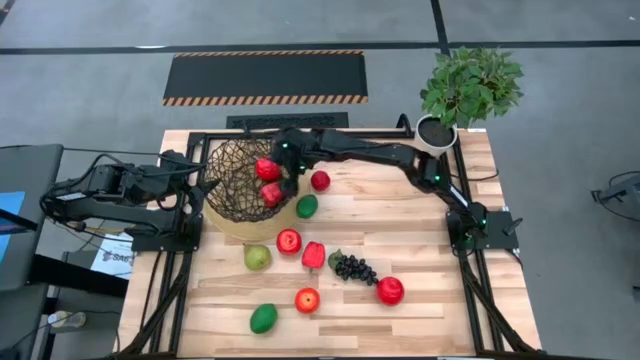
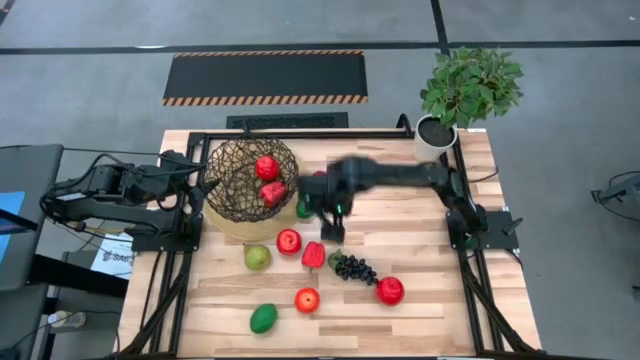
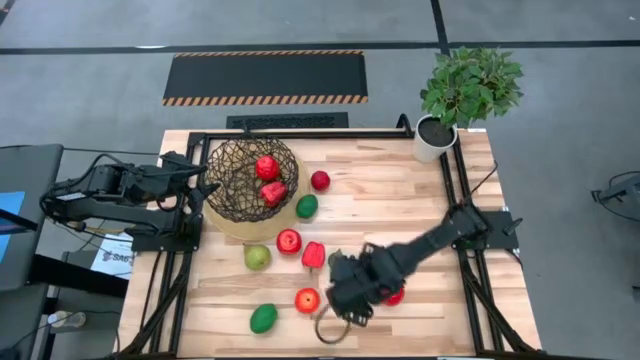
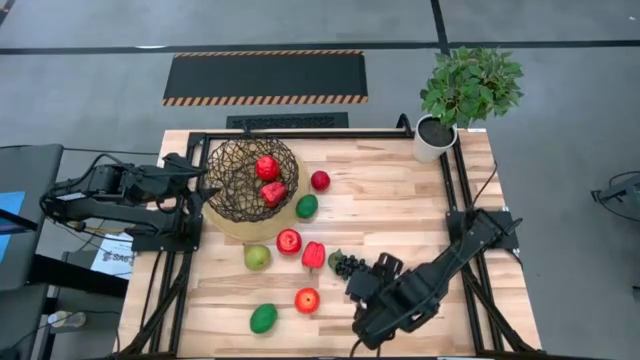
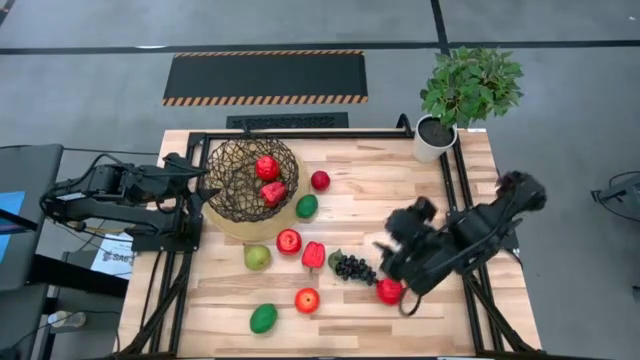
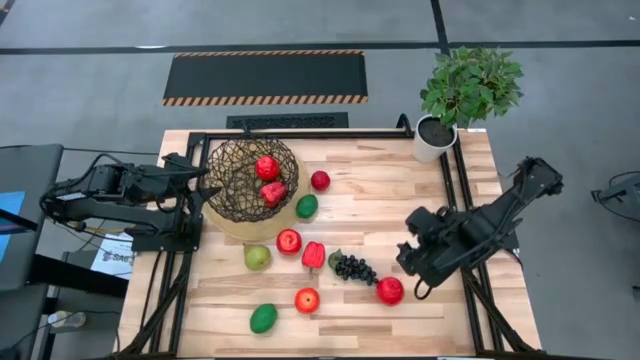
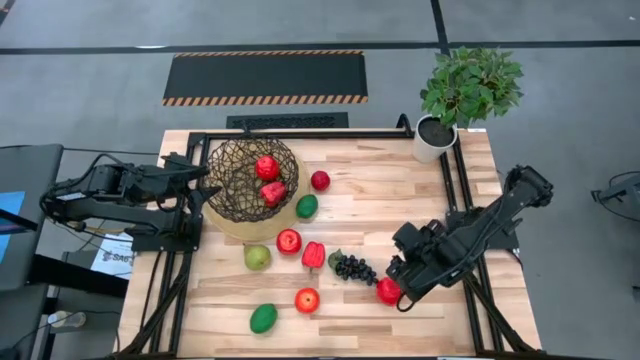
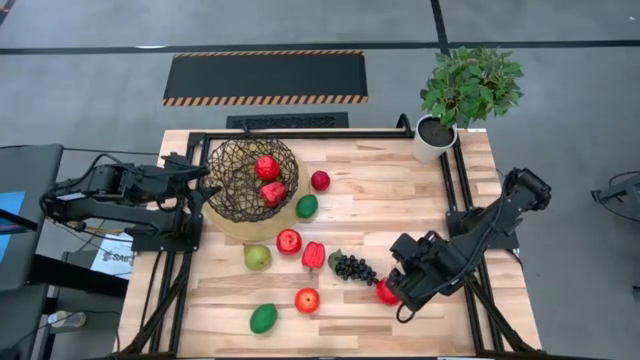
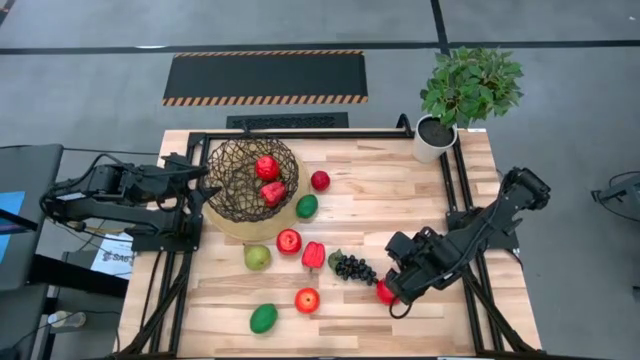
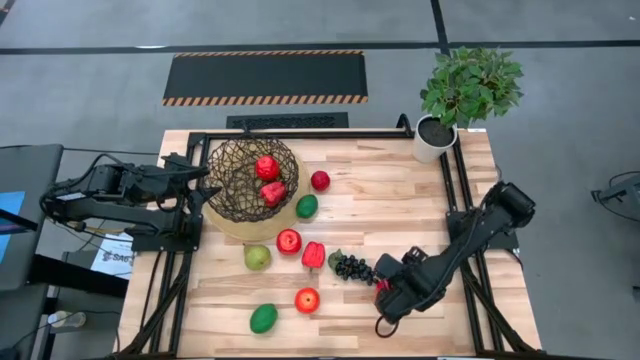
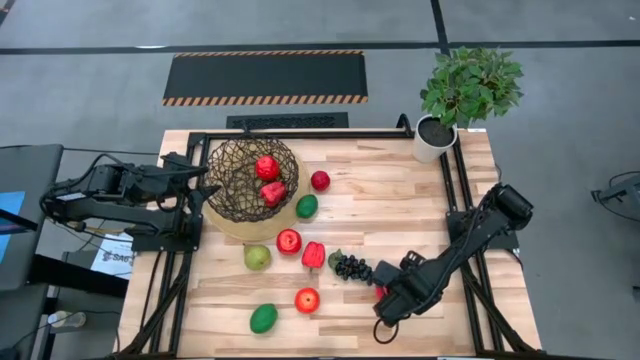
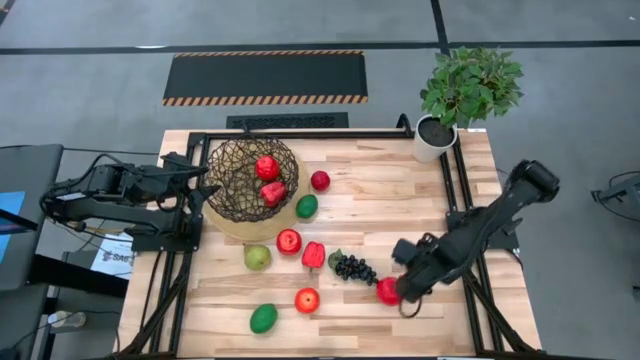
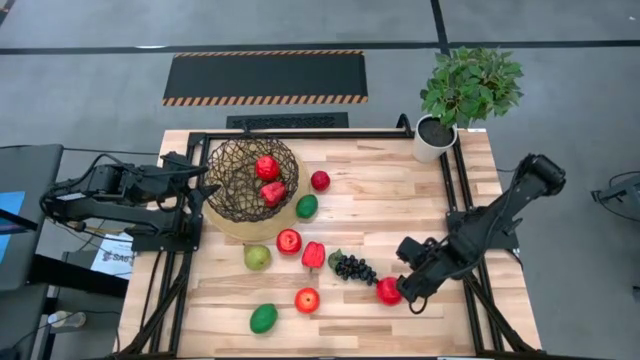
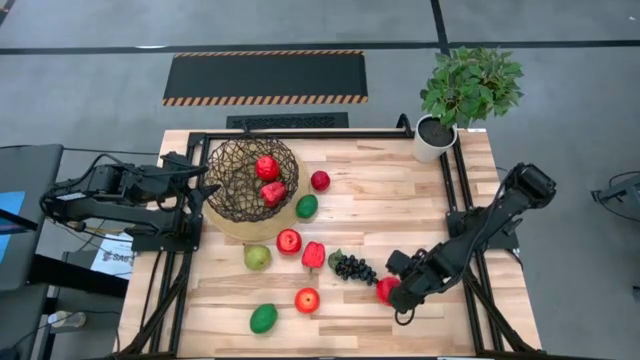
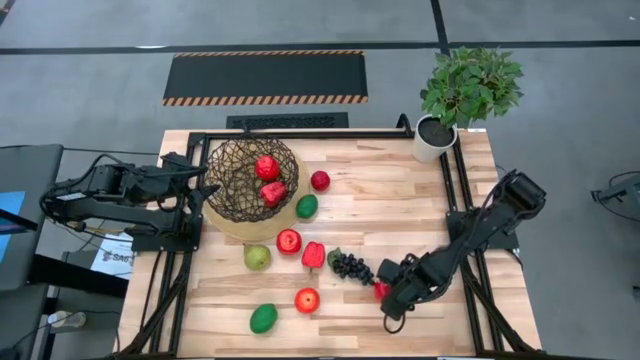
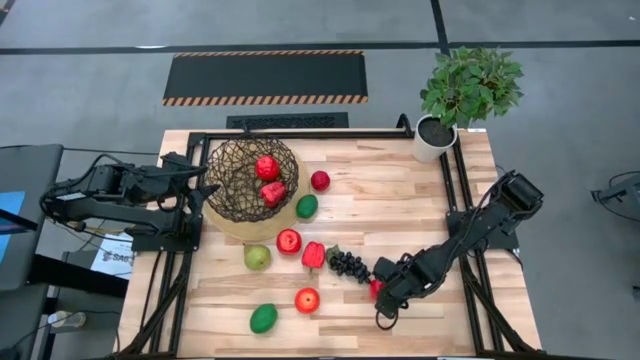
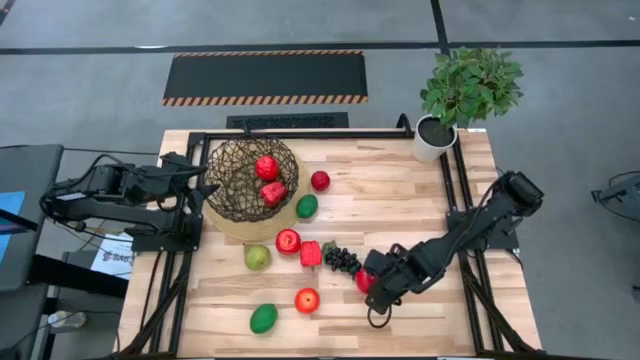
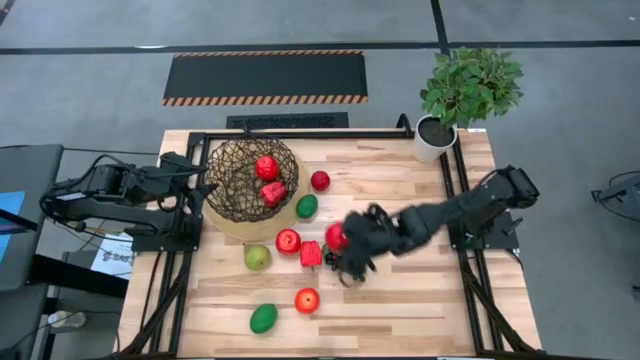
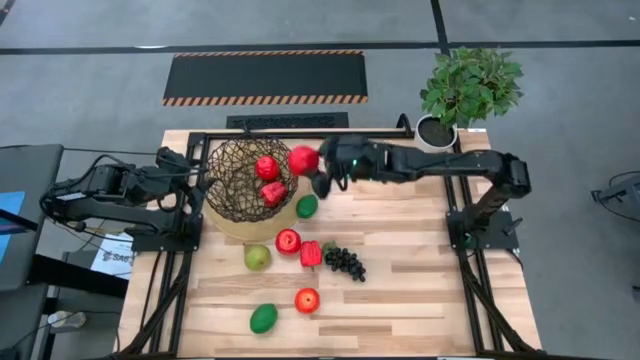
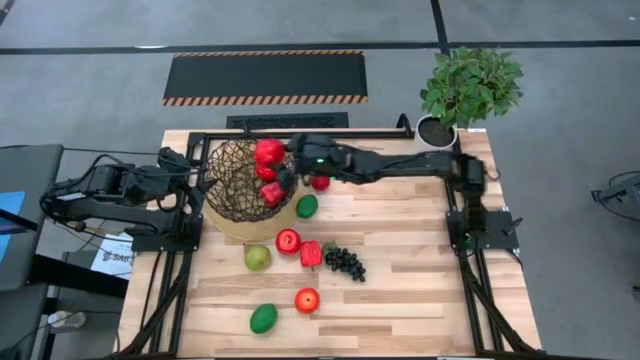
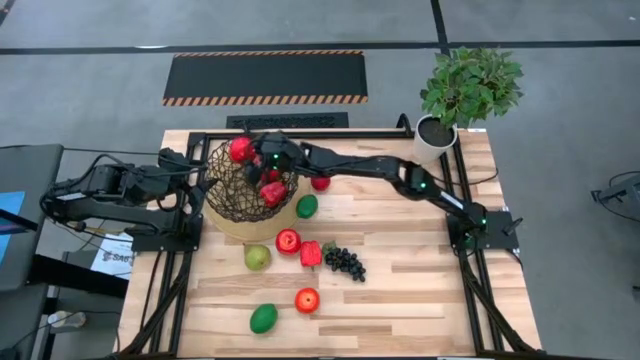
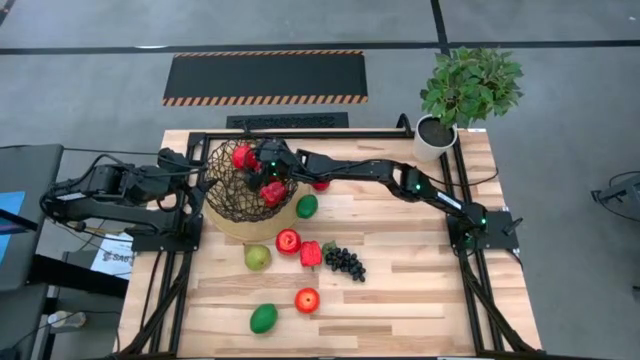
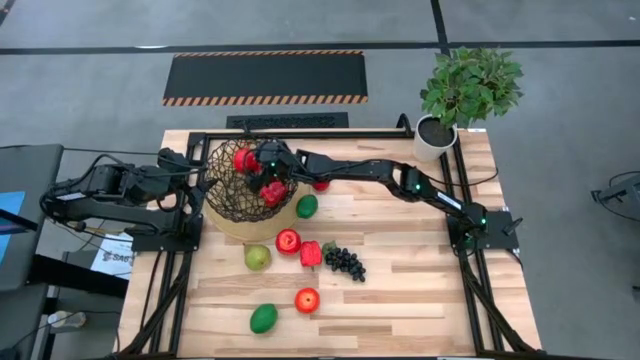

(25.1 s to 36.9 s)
Task: Build produce basket
Put the red apple into the black wire basket

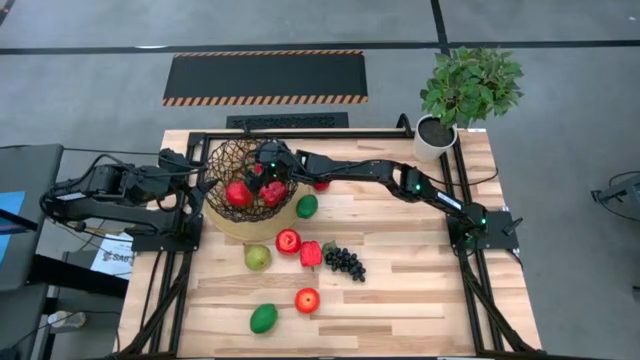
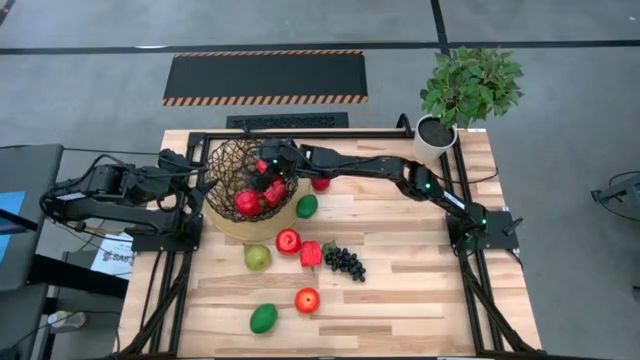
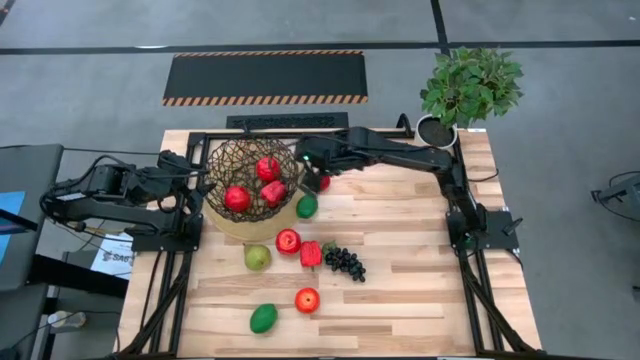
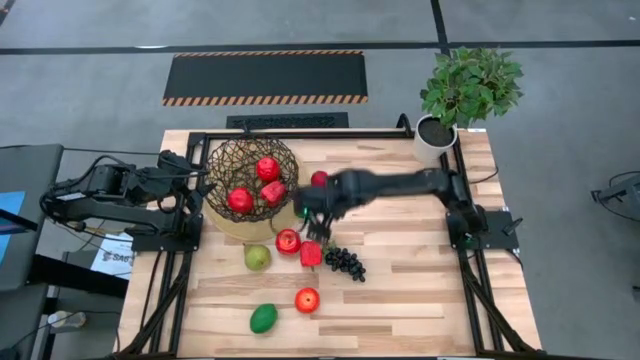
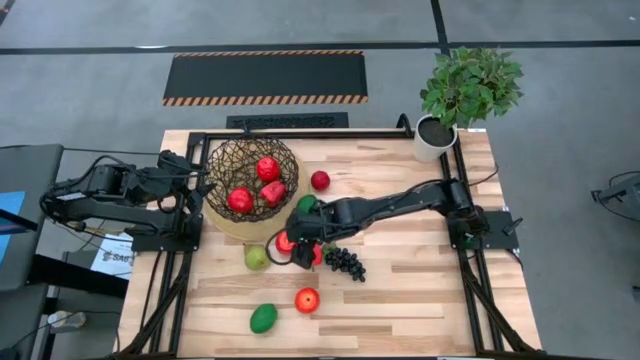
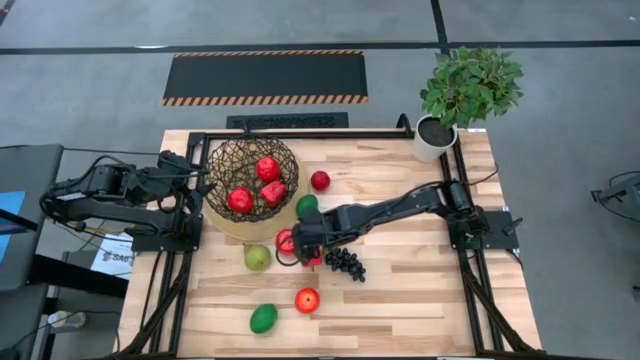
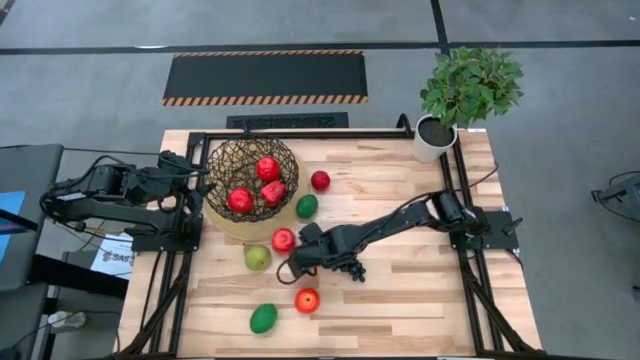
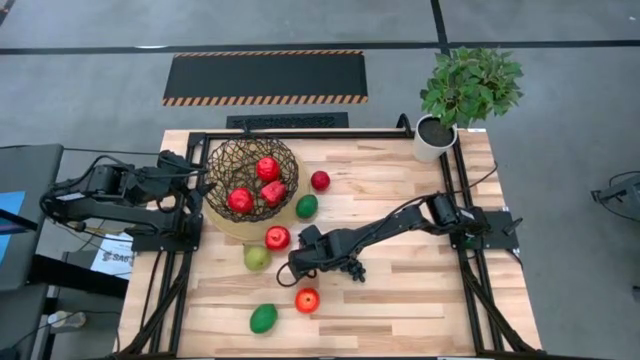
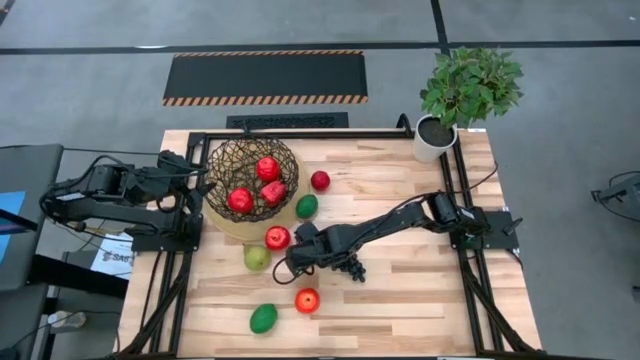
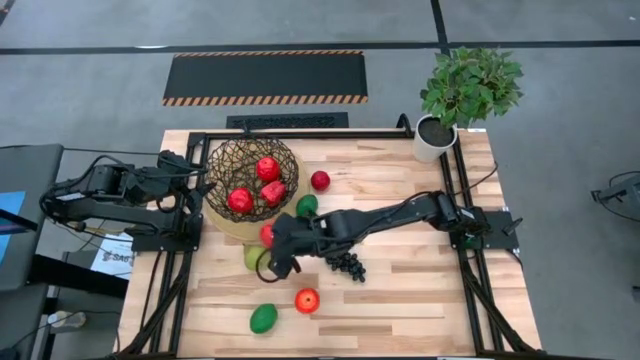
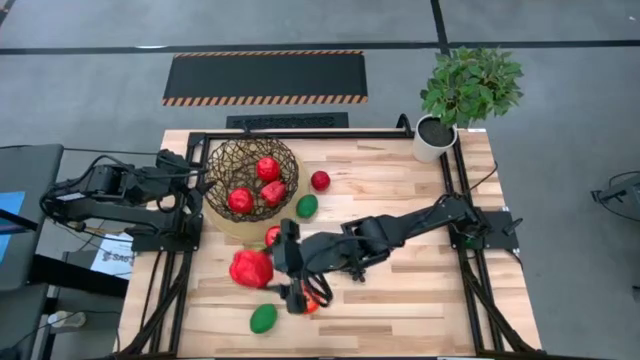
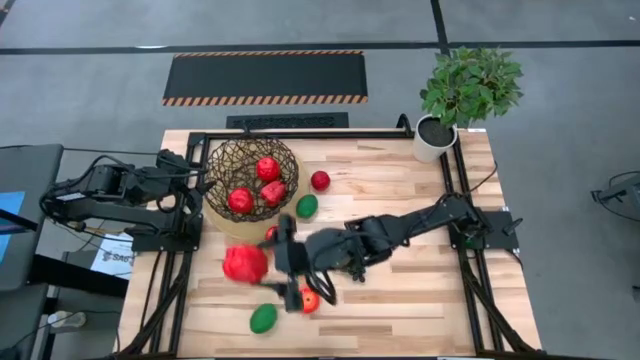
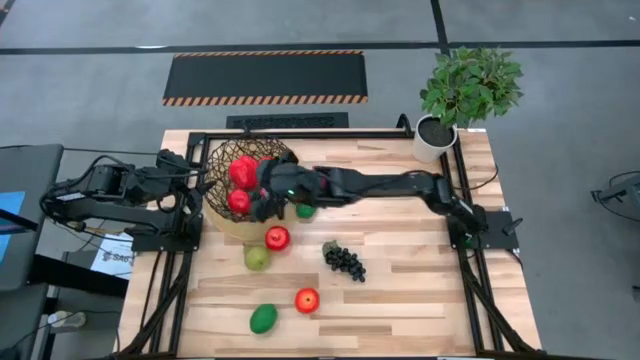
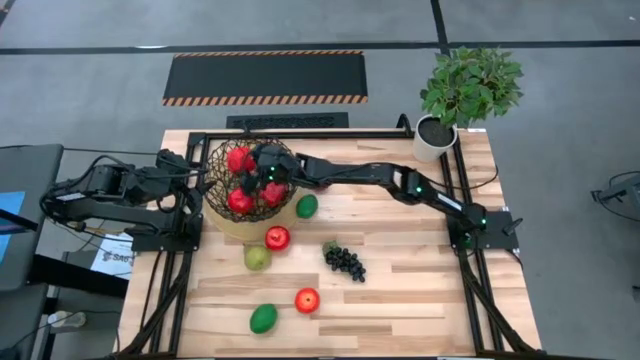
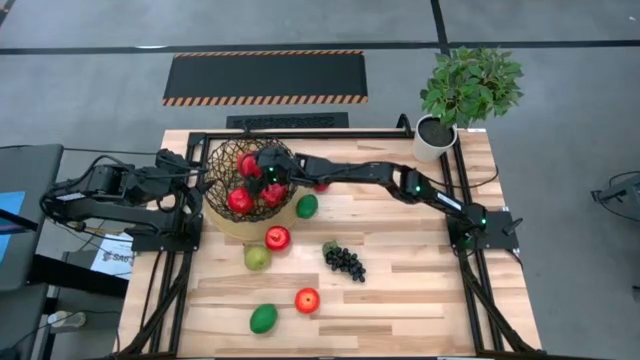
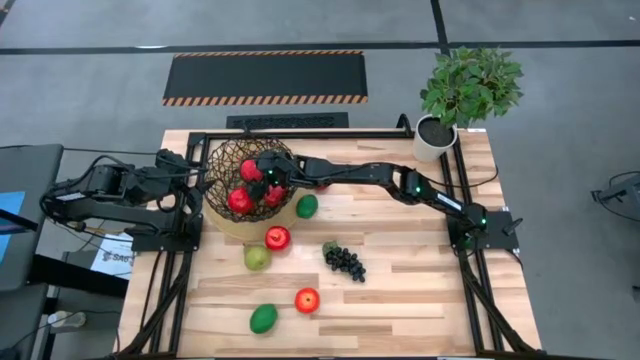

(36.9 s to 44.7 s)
Put the red bell pepper into the black wire basket

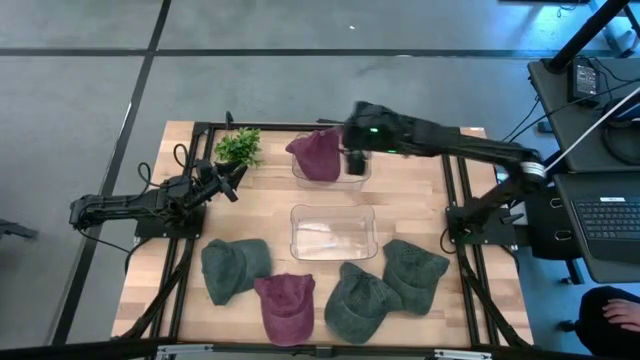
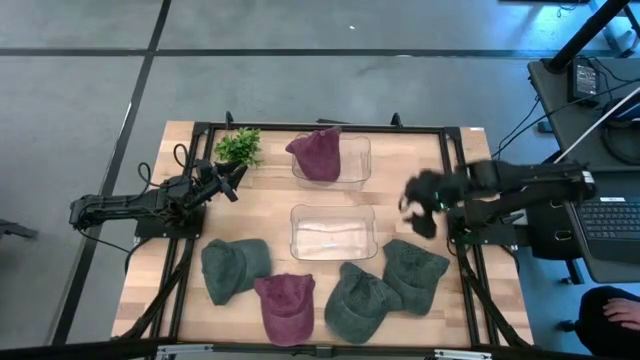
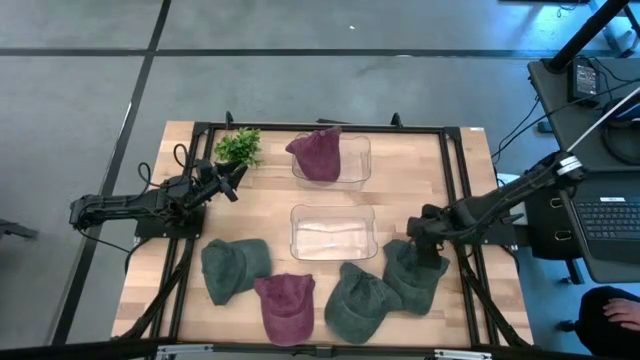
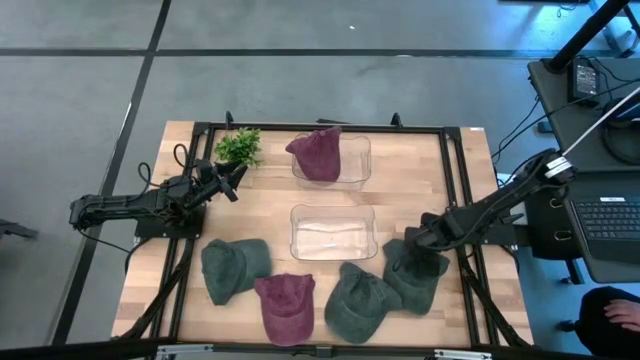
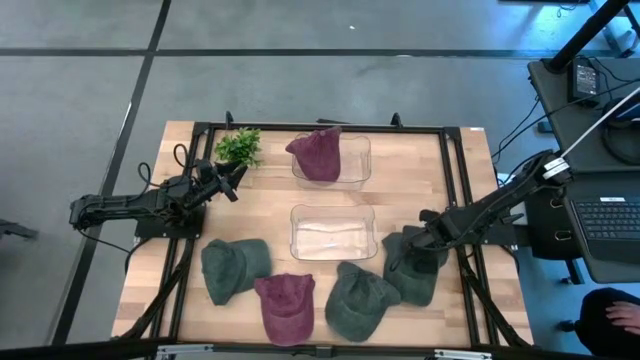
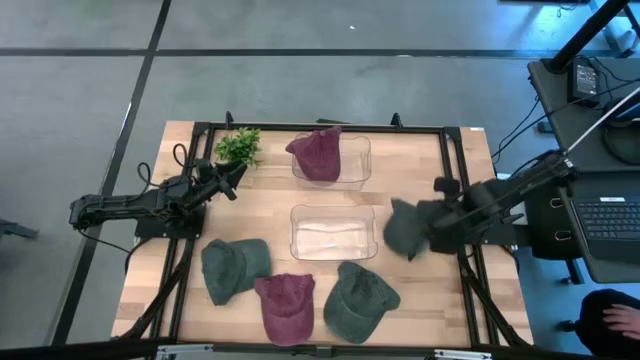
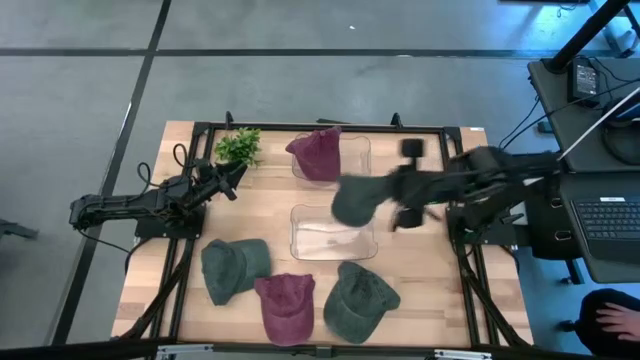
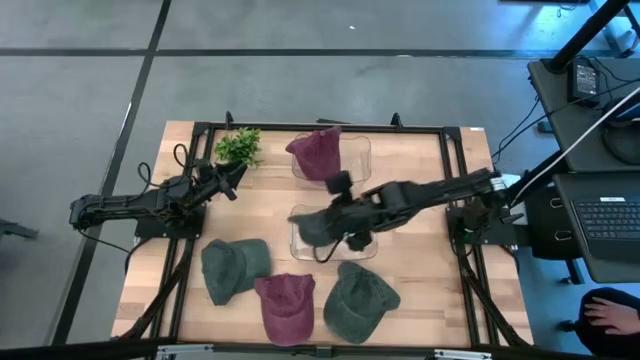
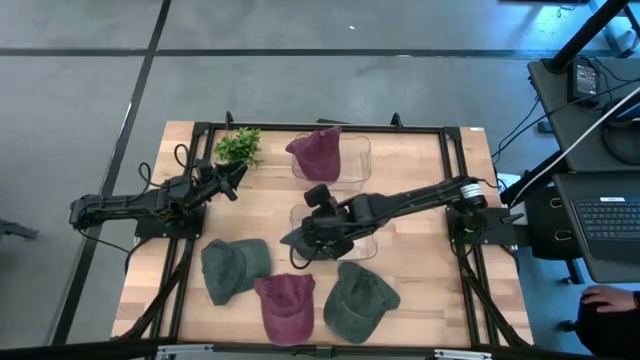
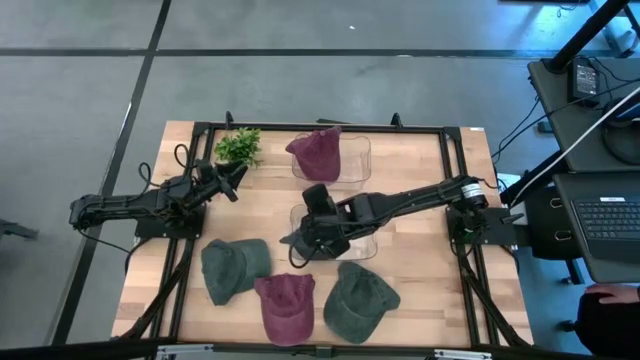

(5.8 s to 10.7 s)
Task: Pick & Place hat
Put the right black cap into the bottom transparent bin
